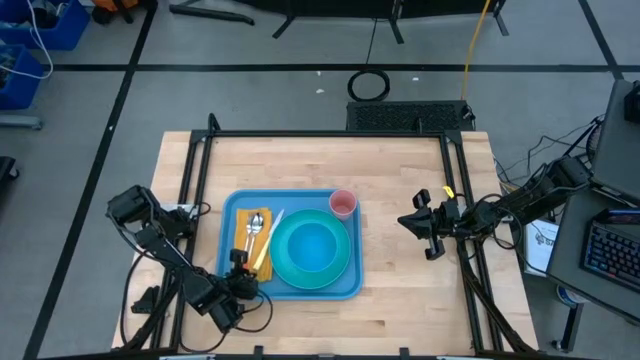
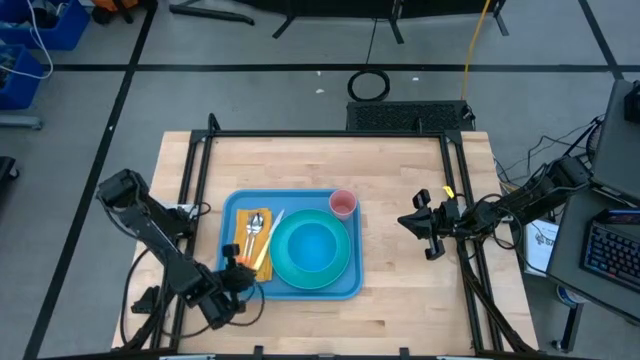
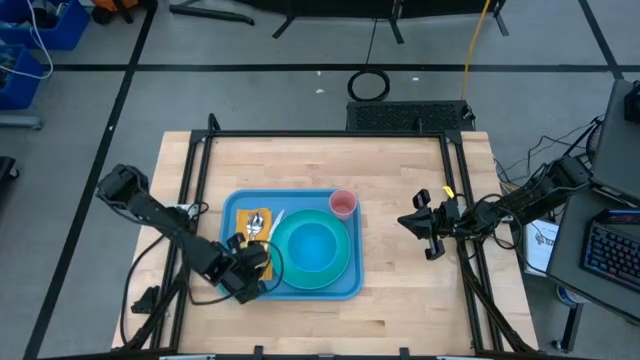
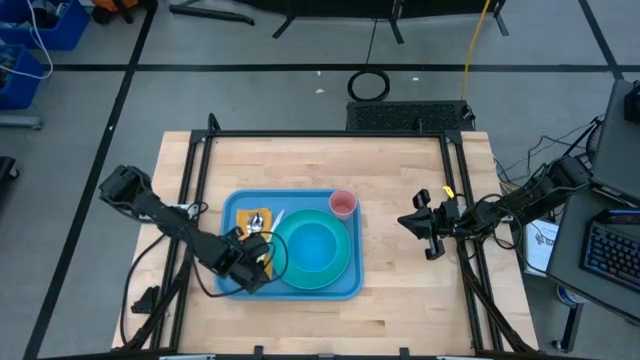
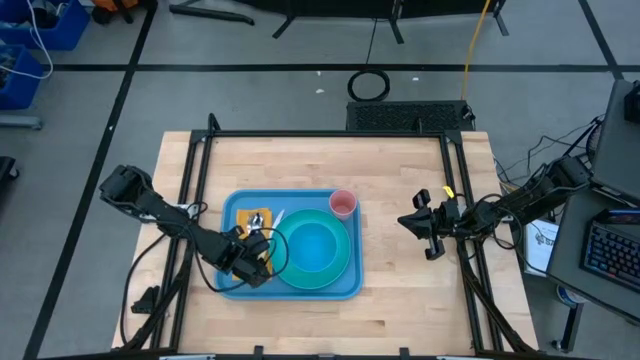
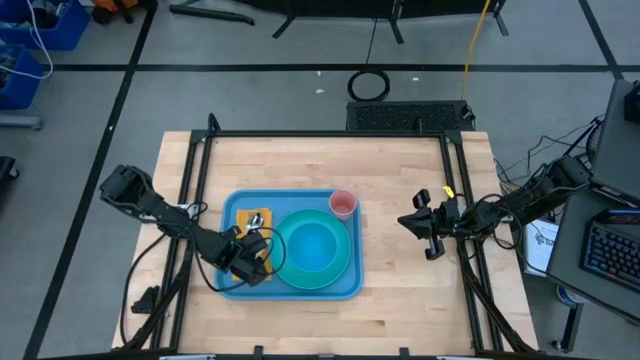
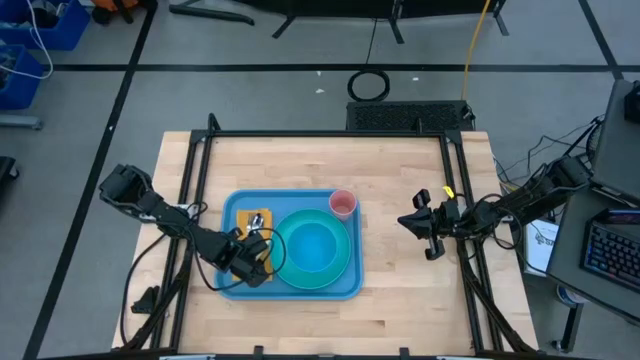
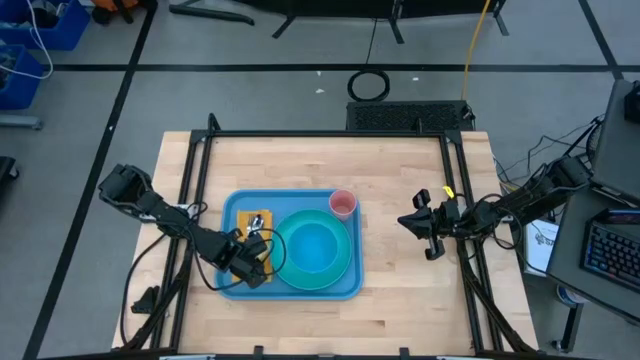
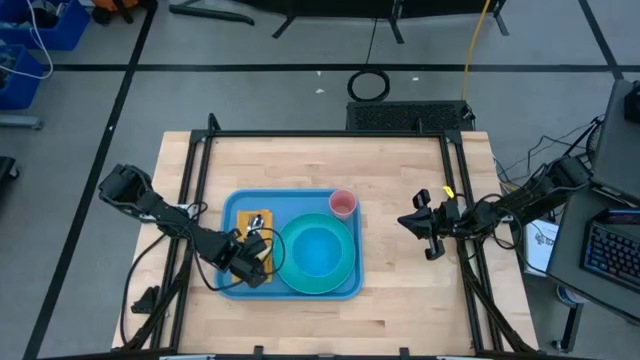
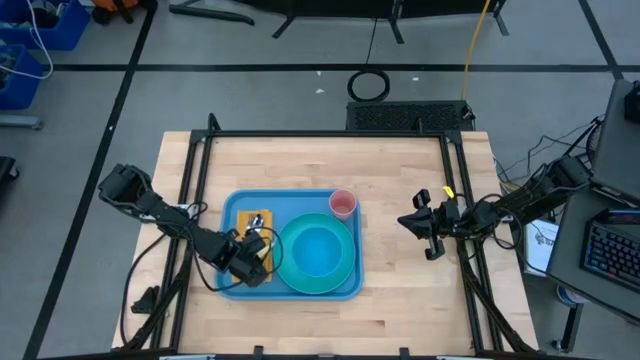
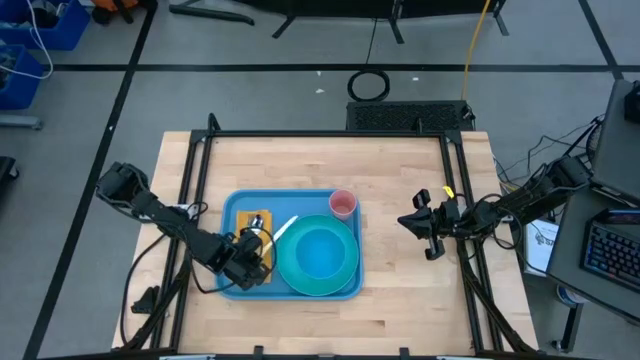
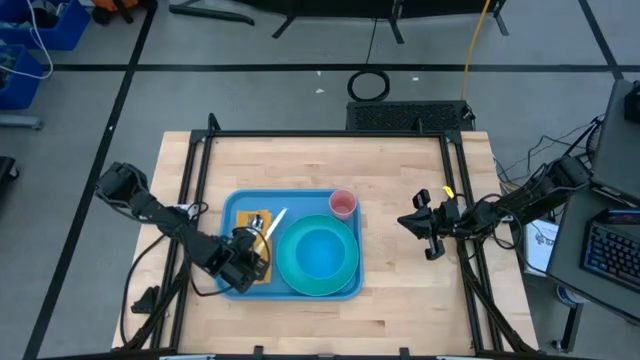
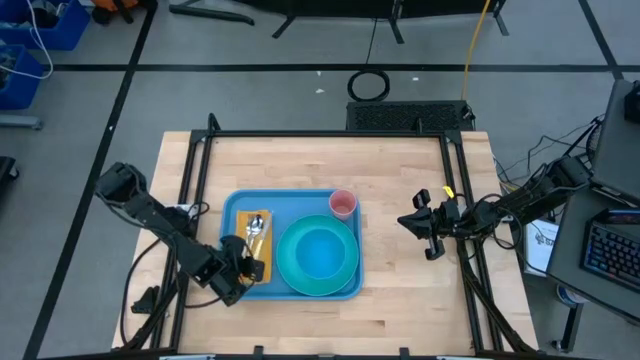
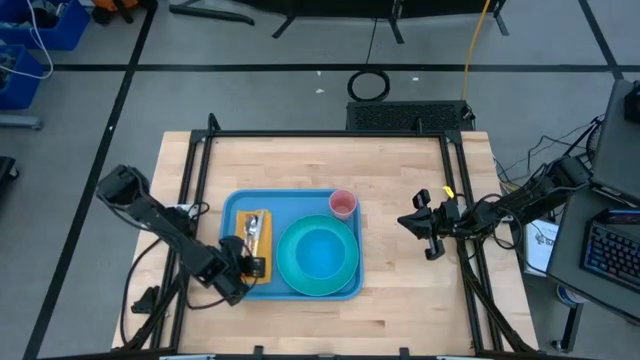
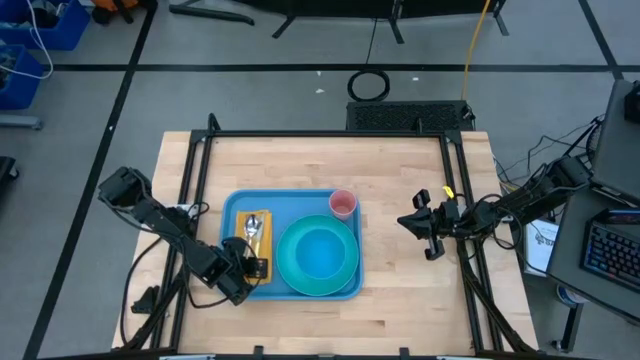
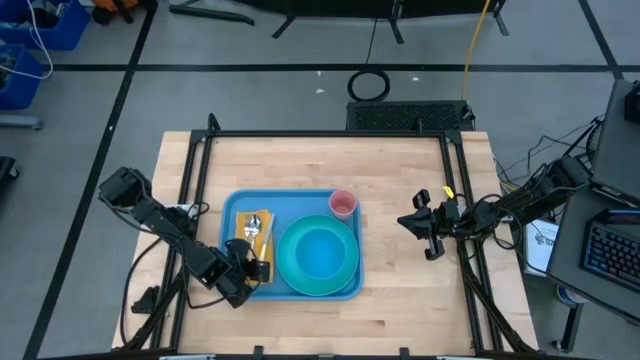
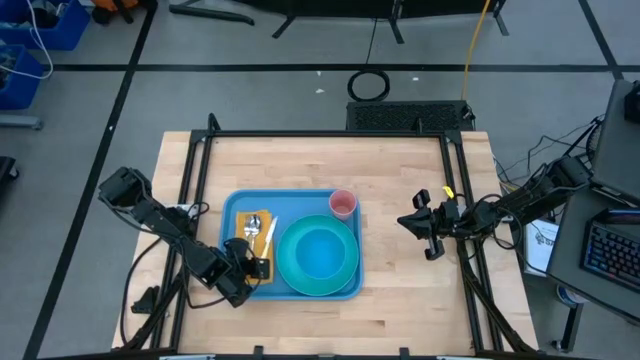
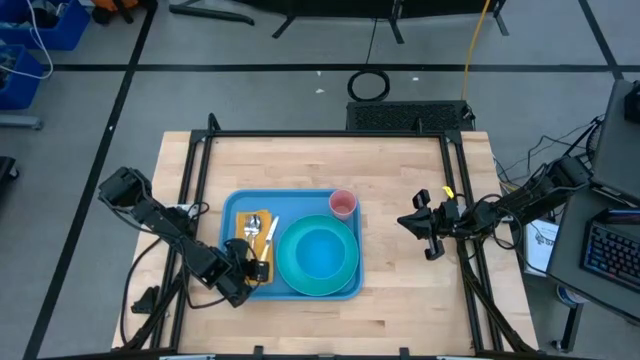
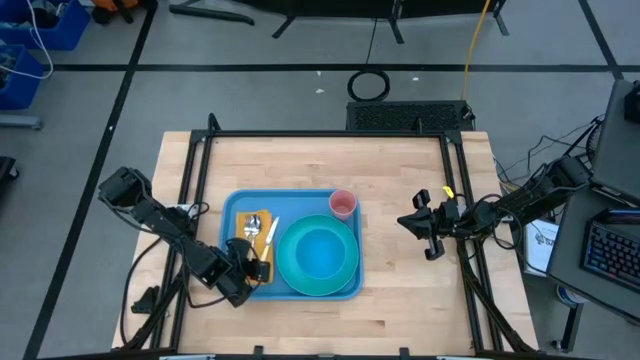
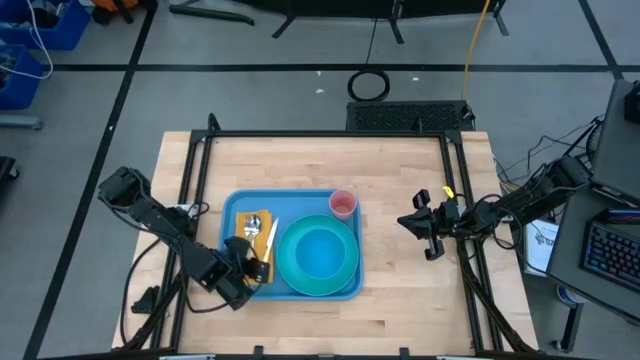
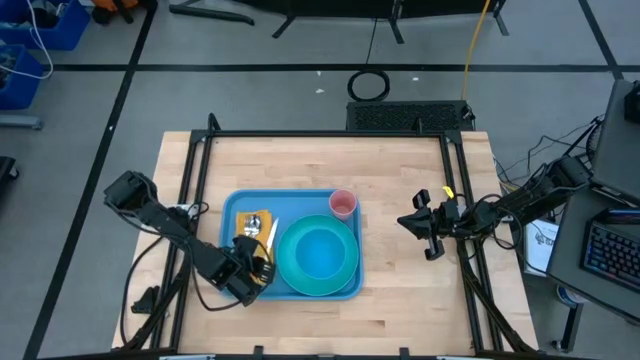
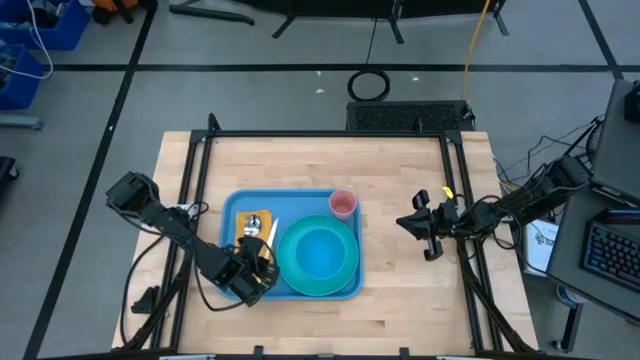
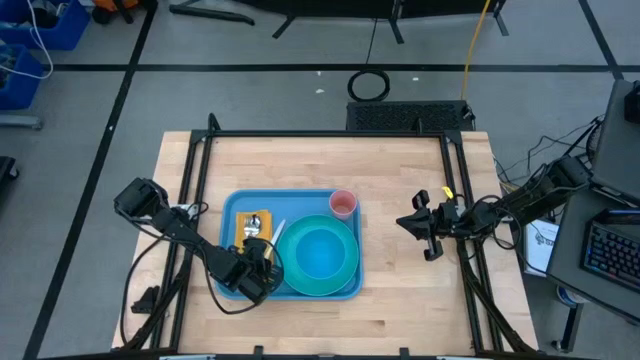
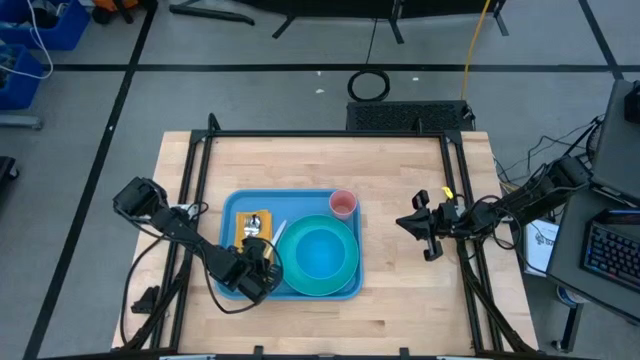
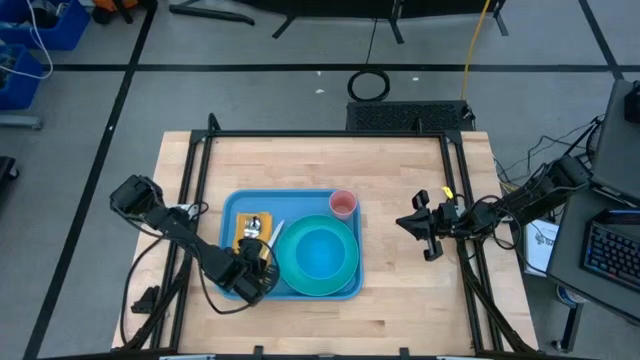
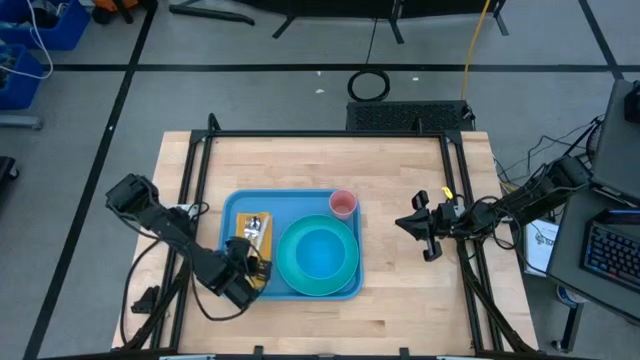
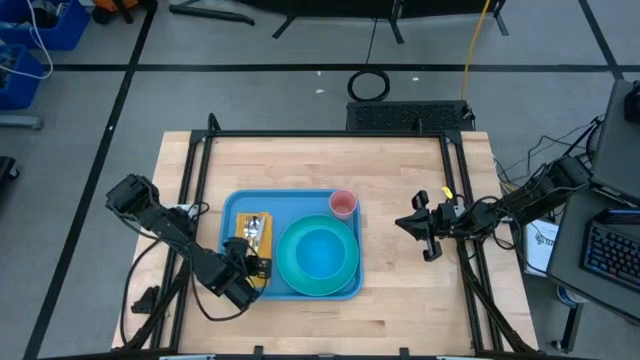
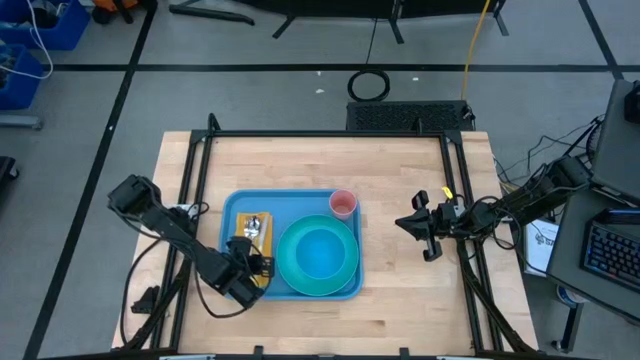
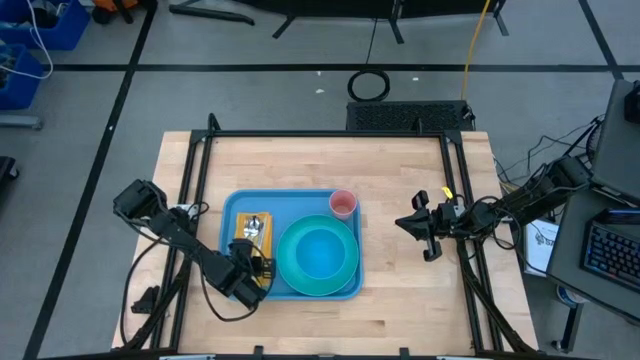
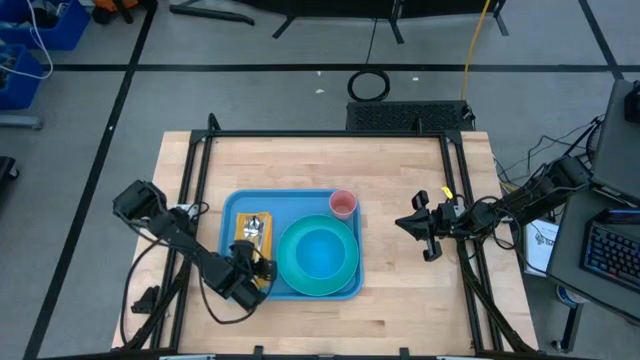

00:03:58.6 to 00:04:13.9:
Task: Set up tray
Put the yellow knife on the blue serving tray to the left of the orange spoon
